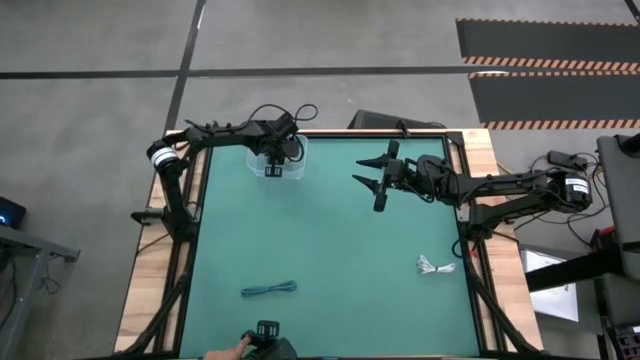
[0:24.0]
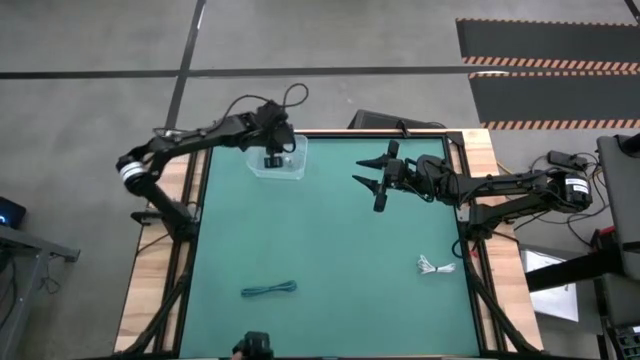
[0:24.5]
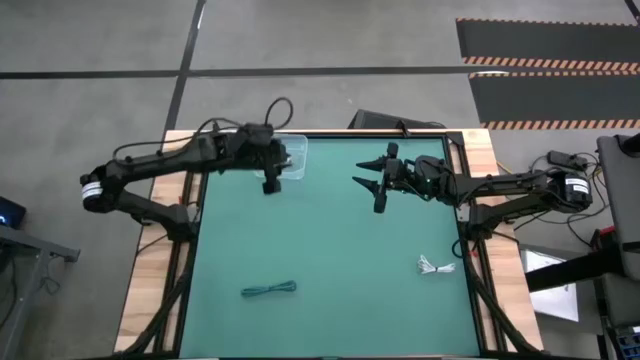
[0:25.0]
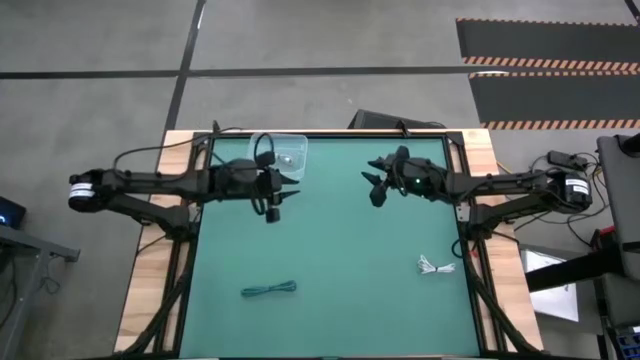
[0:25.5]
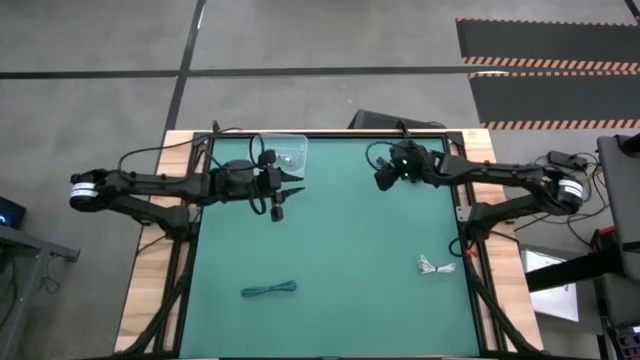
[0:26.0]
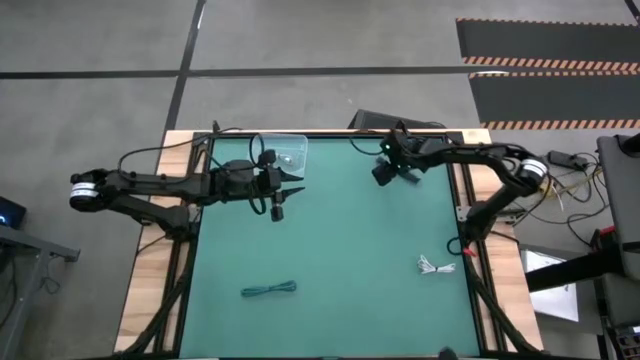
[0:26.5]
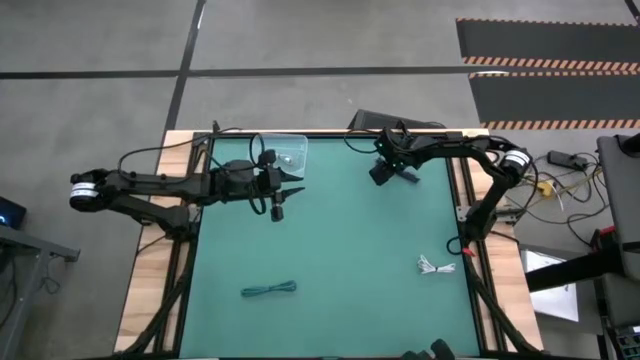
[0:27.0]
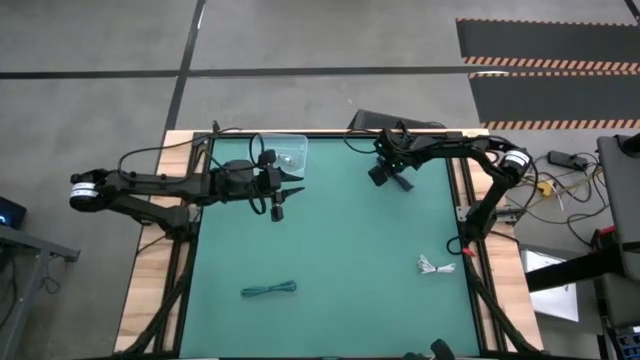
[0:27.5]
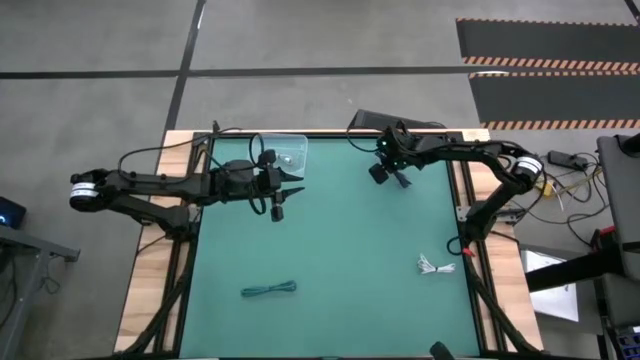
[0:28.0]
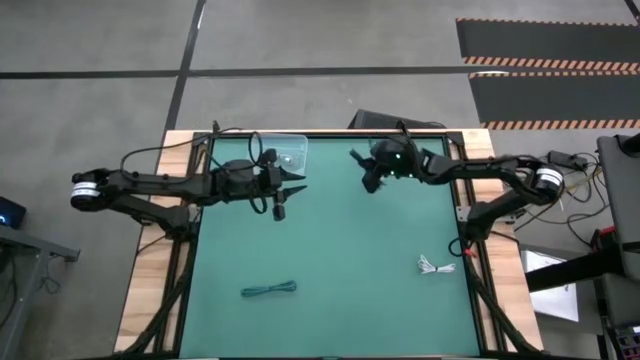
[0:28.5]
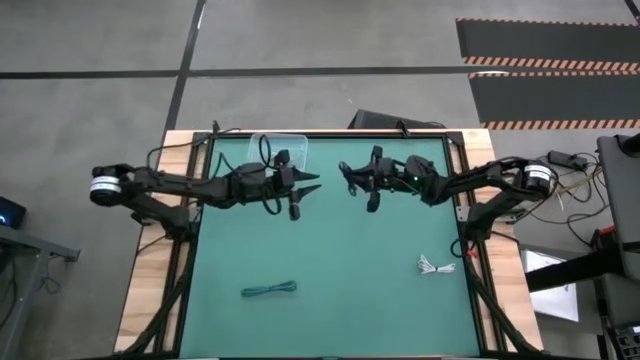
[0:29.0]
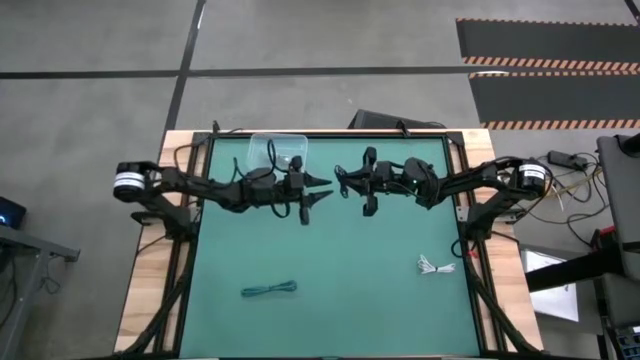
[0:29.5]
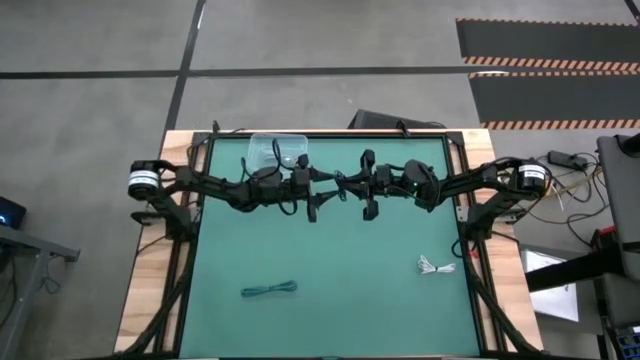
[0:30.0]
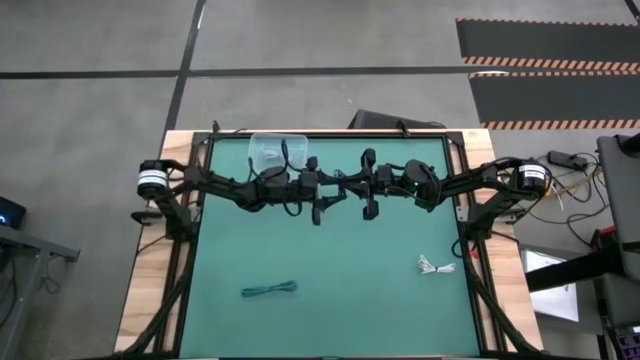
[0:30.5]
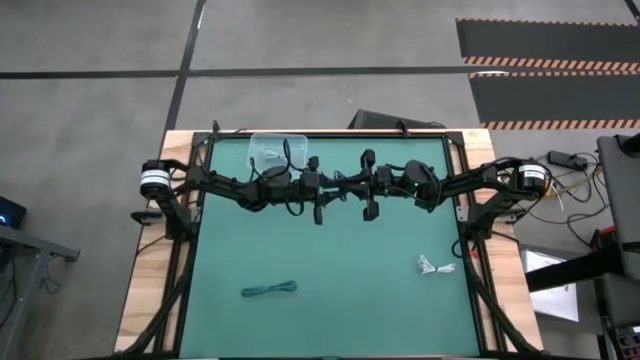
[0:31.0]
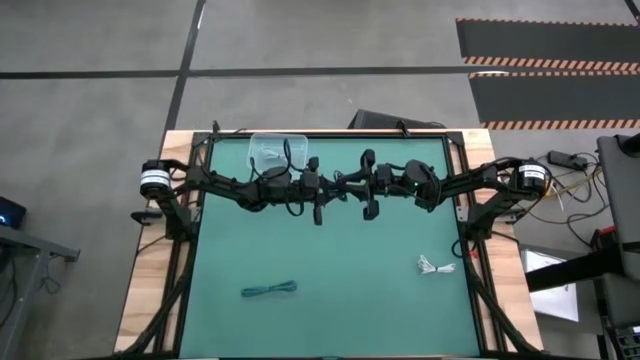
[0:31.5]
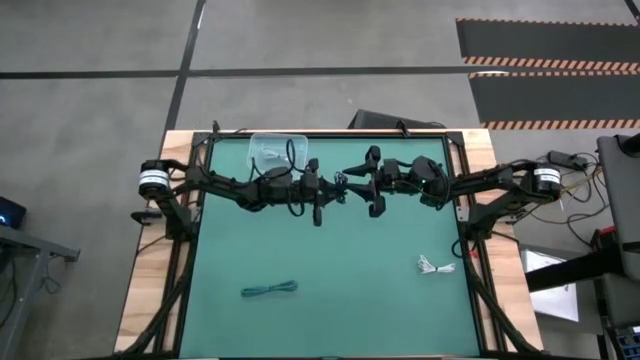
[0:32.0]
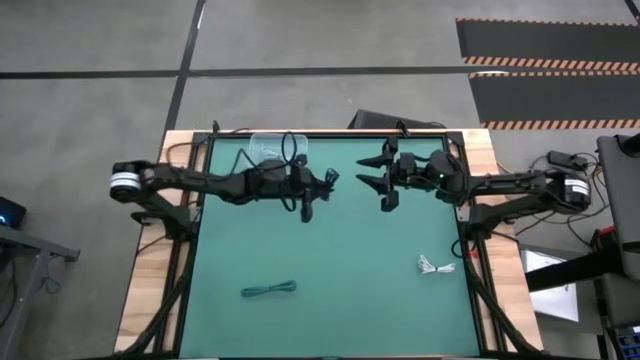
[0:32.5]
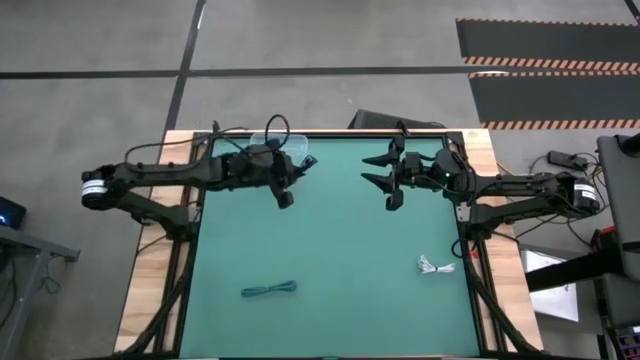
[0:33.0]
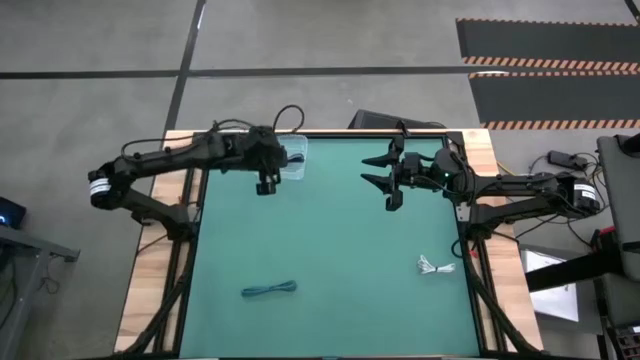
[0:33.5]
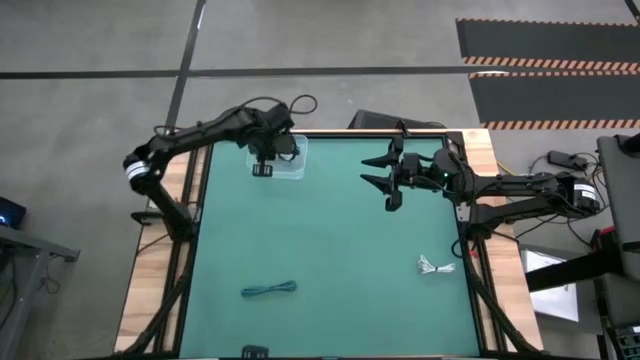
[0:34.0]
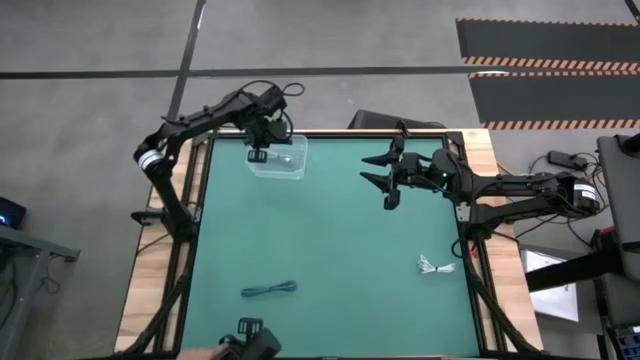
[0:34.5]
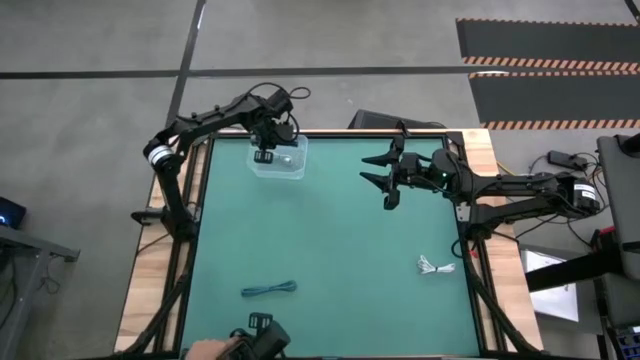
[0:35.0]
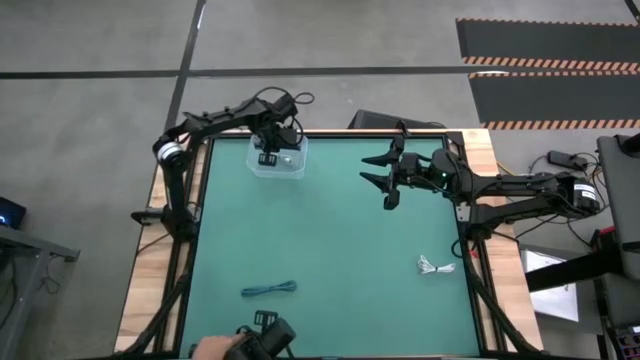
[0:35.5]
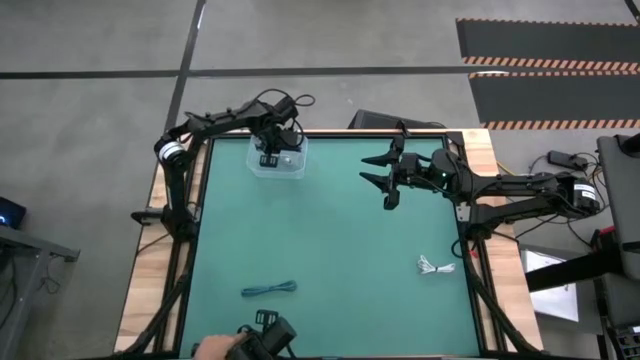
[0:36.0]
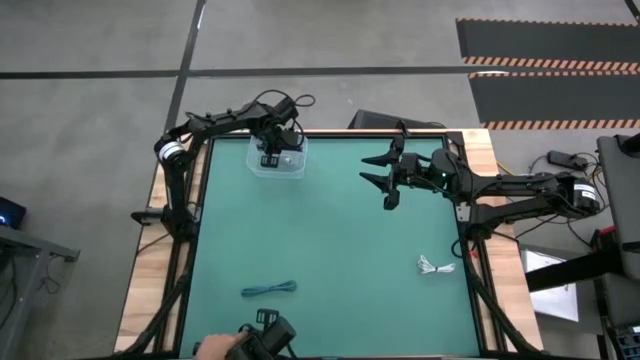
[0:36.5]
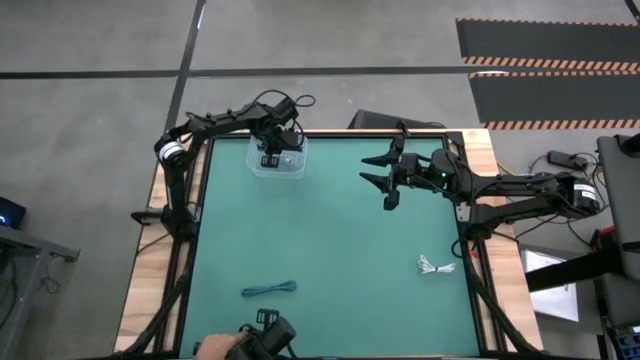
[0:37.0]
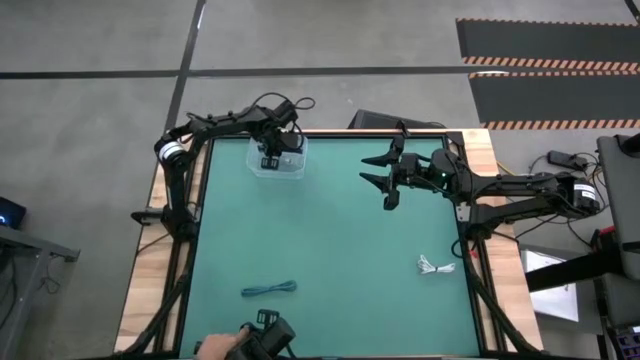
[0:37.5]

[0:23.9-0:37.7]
Task: Pick and place USB-C Cables
Put the violet charger cable into the transparent bin

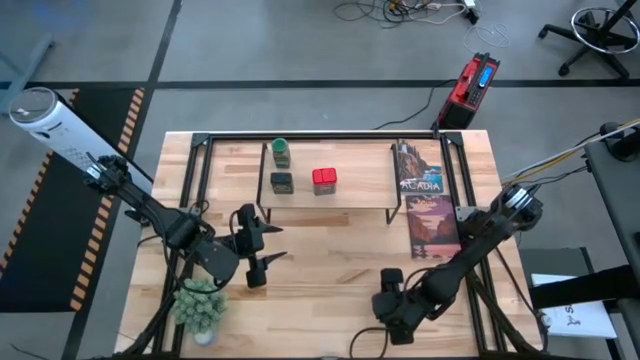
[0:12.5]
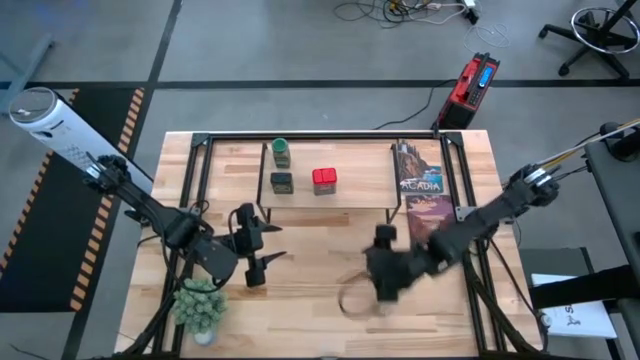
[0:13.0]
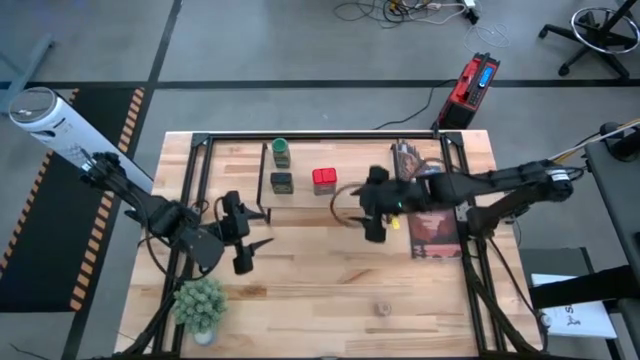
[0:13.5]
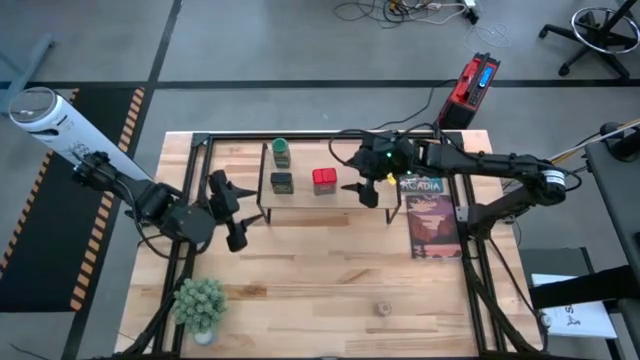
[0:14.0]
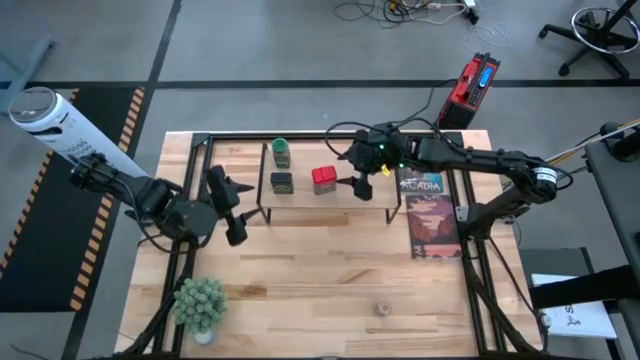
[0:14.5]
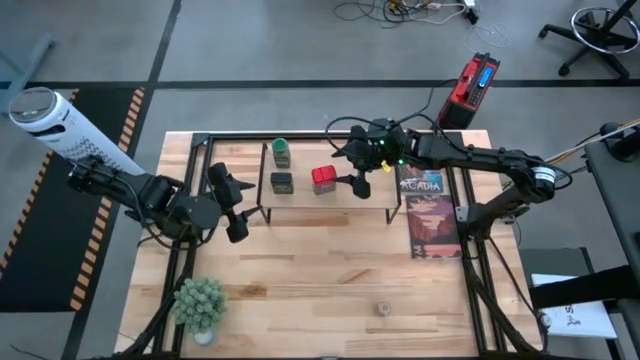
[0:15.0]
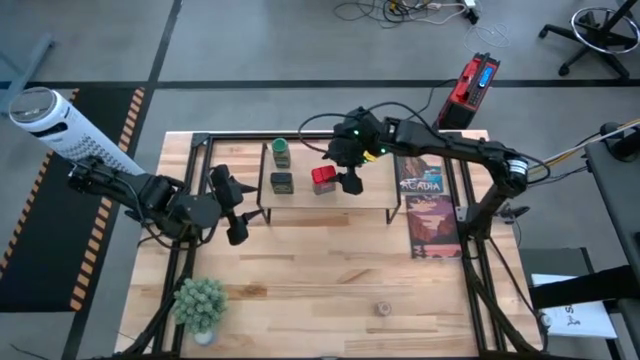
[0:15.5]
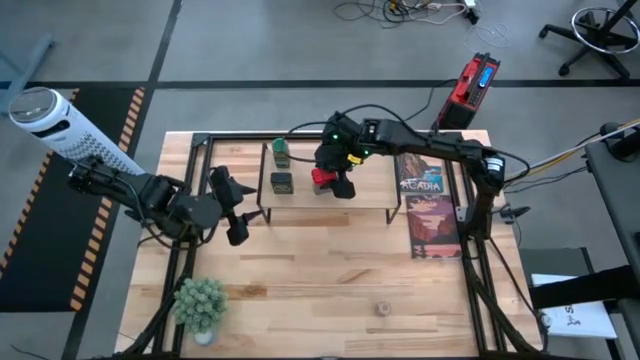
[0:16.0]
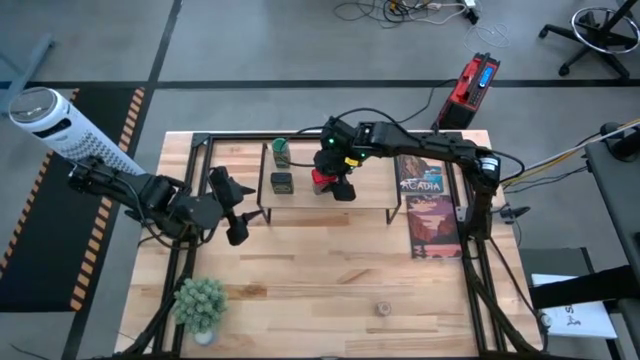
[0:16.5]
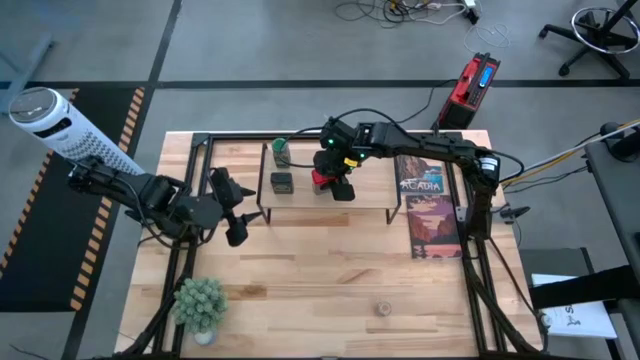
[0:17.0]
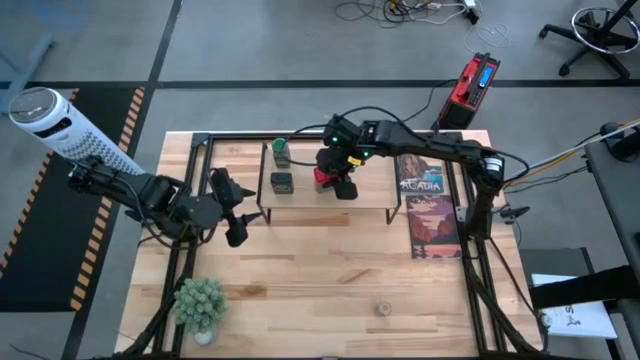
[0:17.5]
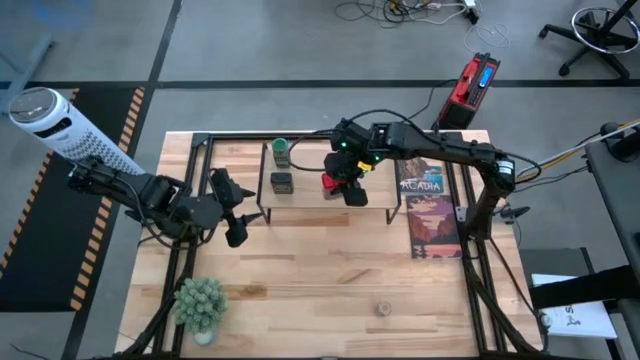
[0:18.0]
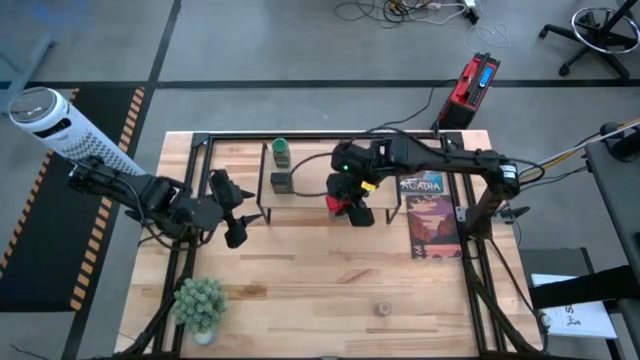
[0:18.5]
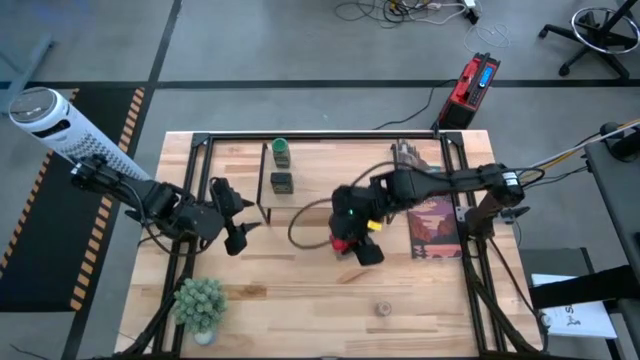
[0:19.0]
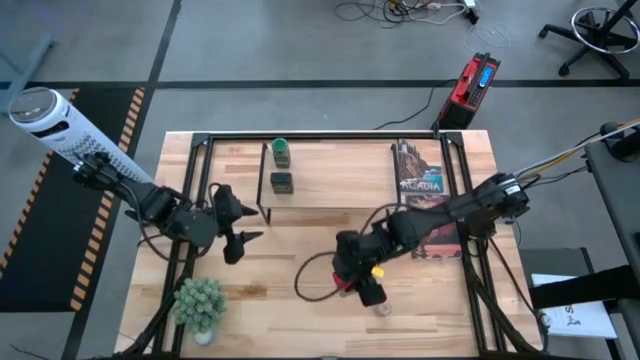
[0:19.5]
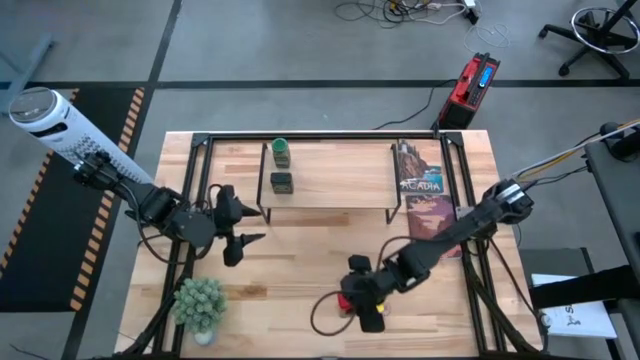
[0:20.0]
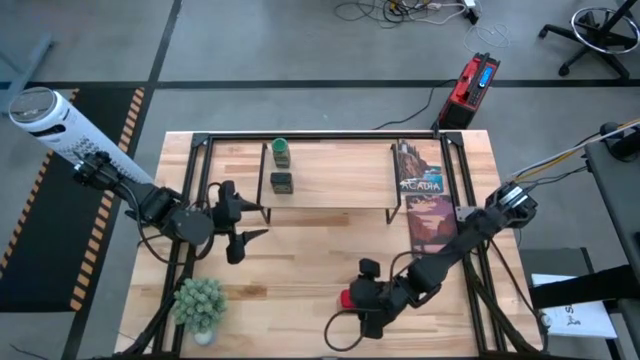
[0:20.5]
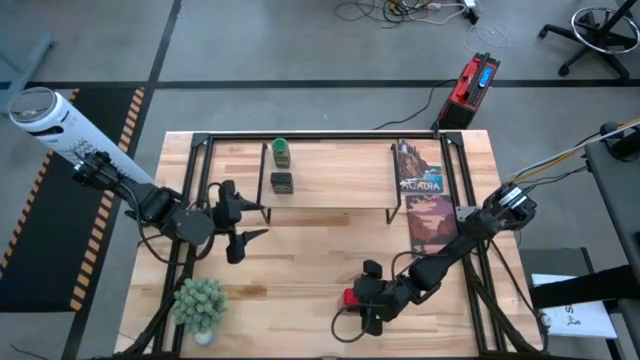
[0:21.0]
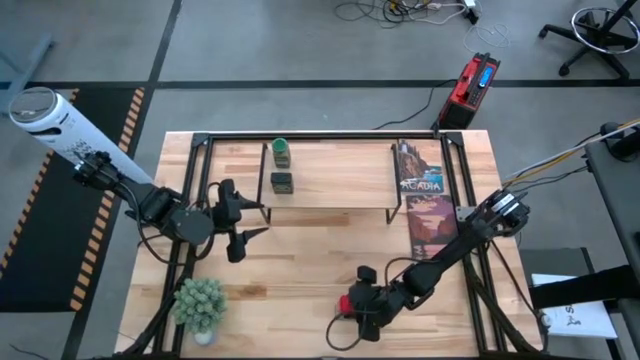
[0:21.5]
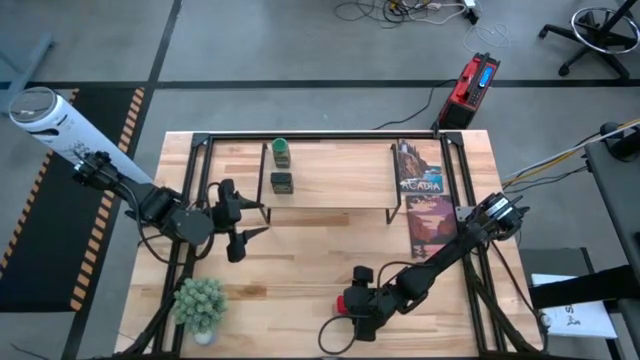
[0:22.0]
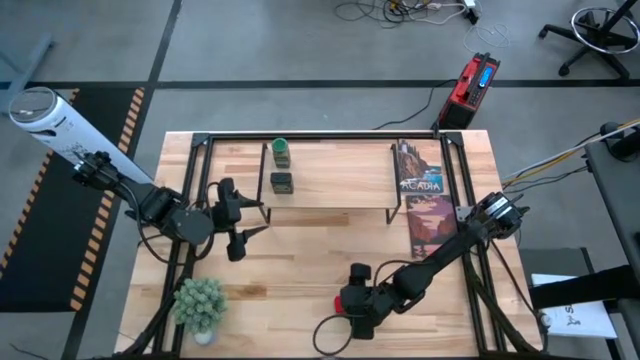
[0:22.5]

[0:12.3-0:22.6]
Task: Shelf spices
Remove the red seasoning can from the shelf
